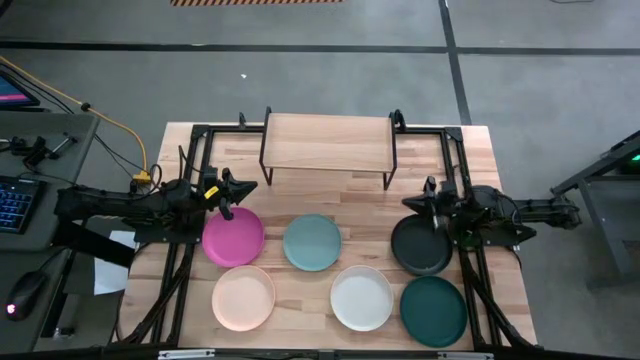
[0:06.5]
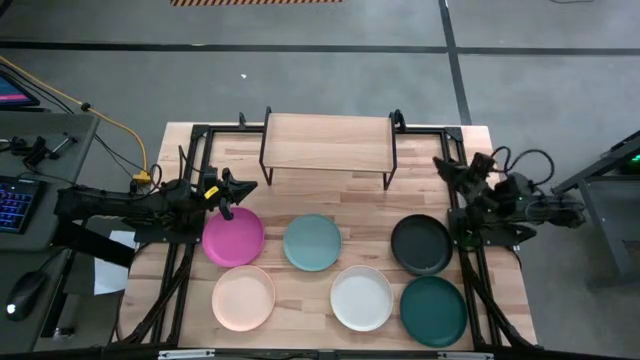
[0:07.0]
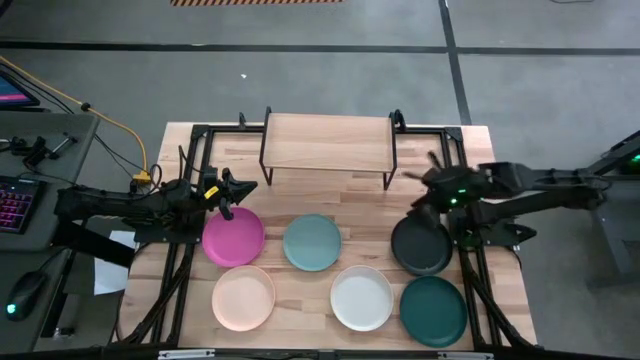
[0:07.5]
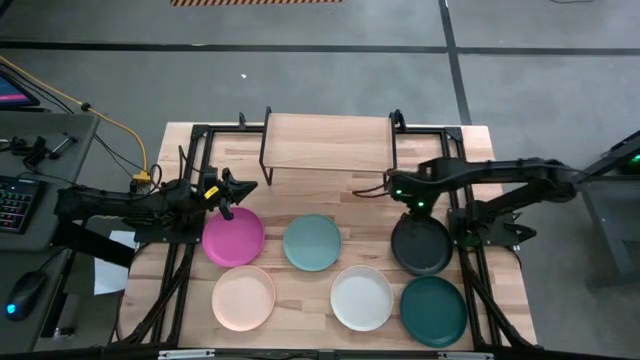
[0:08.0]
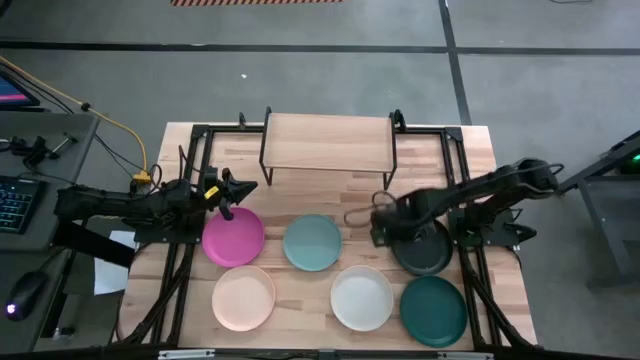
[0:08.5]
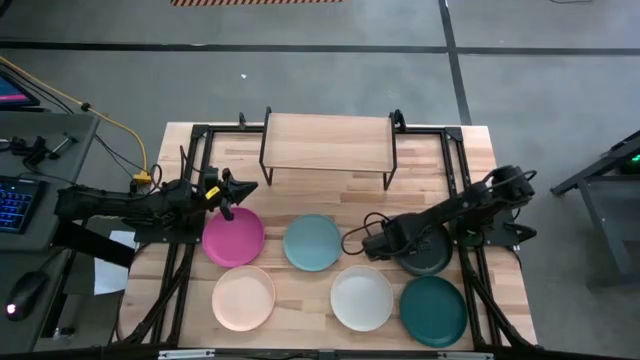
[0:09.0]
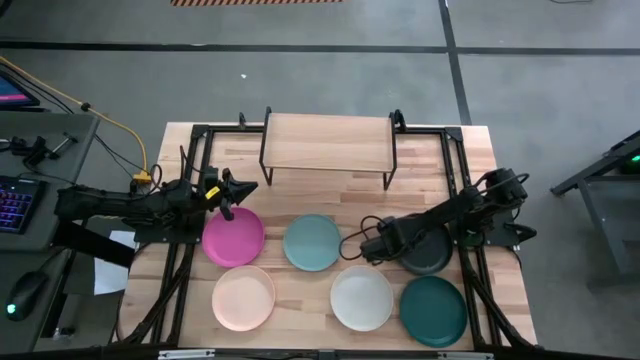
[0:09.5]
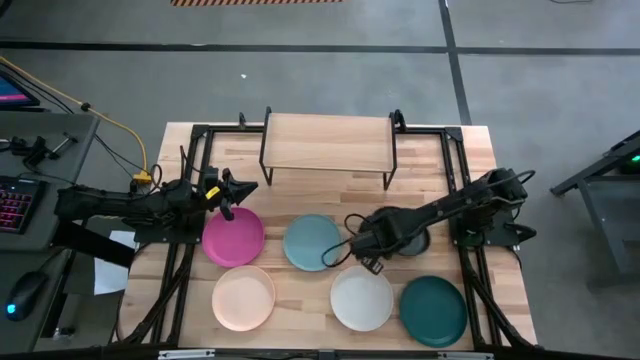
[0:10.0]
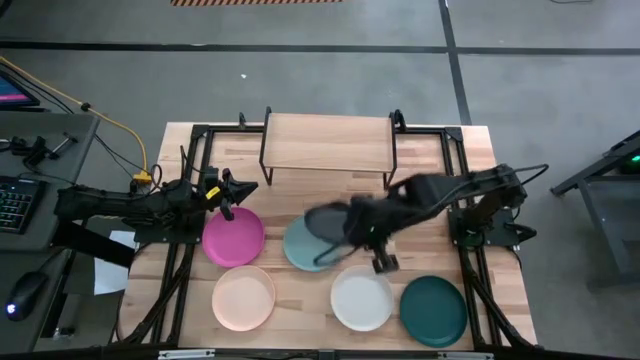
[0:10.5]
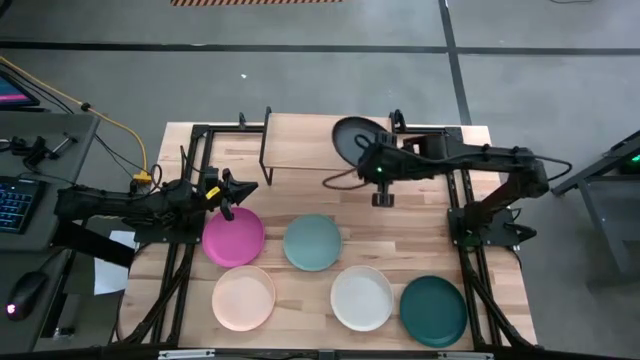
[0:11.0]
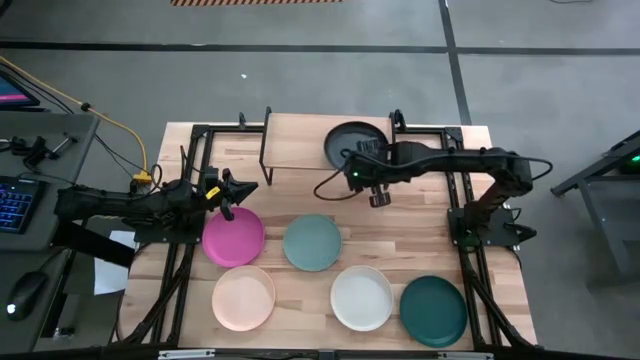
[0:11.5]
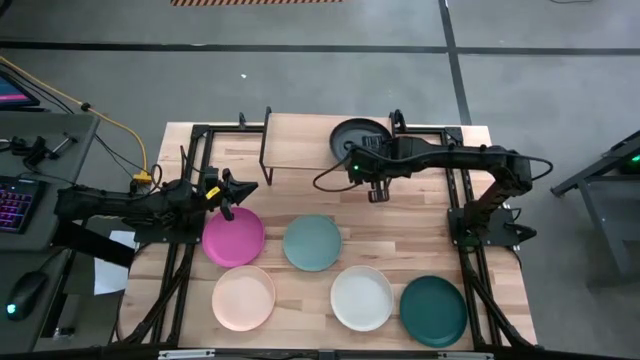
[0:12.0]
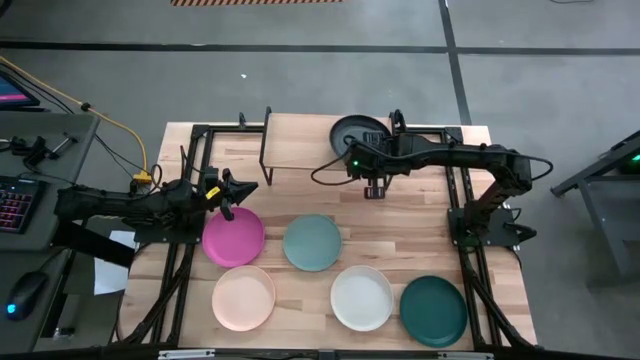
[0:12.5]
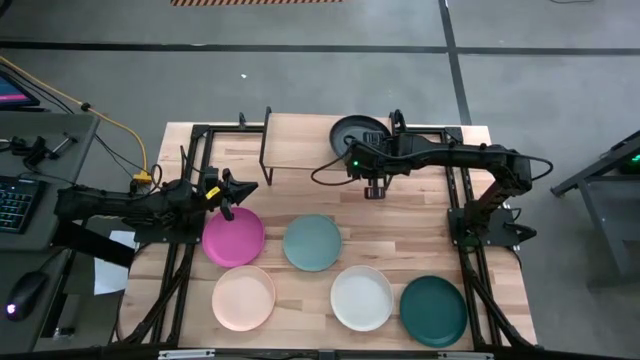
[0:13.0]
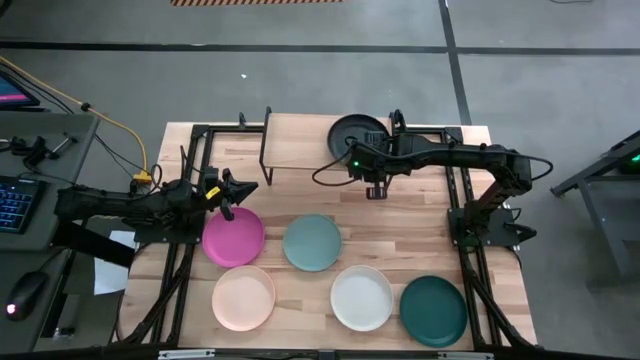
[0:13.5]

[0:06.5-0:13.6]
Task: Place and stack plates onto a shelf
Put the black plate on the shelf

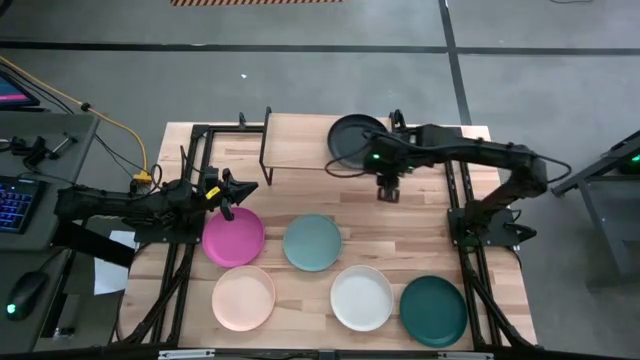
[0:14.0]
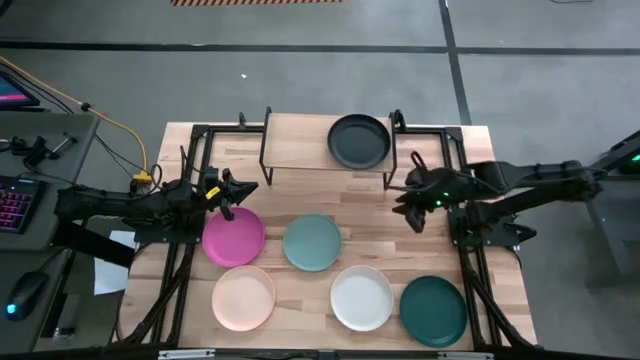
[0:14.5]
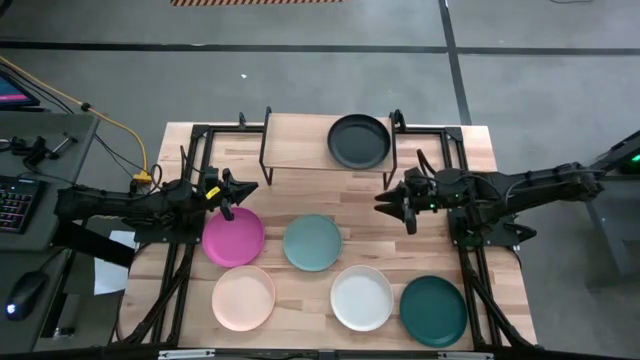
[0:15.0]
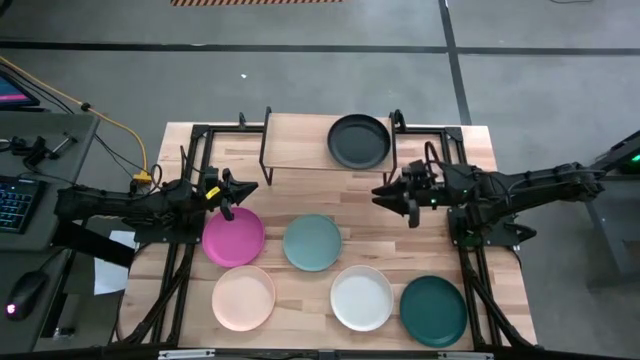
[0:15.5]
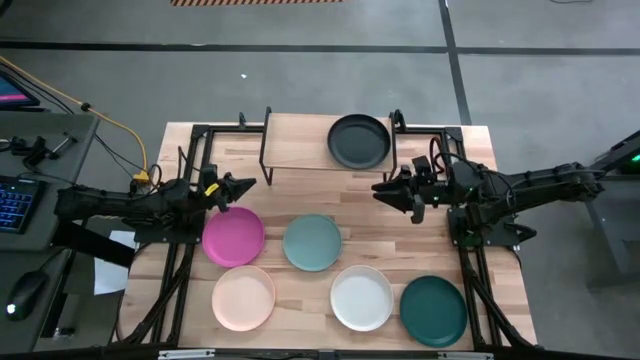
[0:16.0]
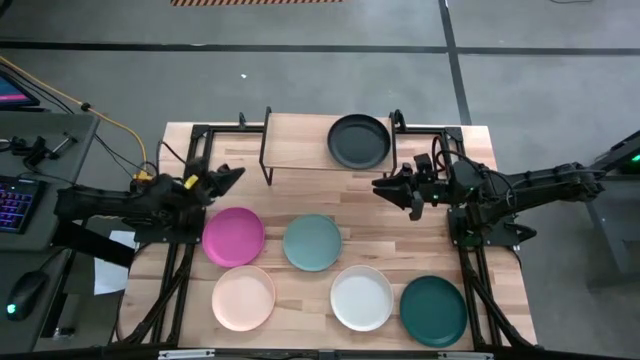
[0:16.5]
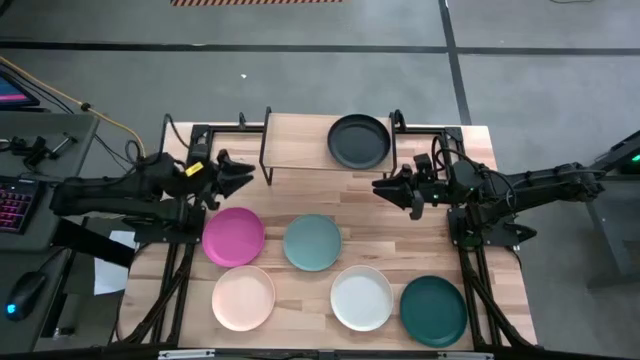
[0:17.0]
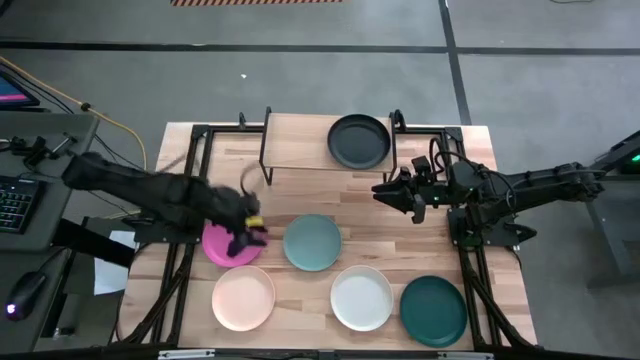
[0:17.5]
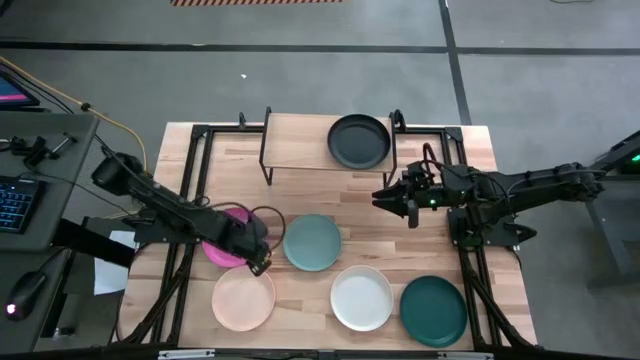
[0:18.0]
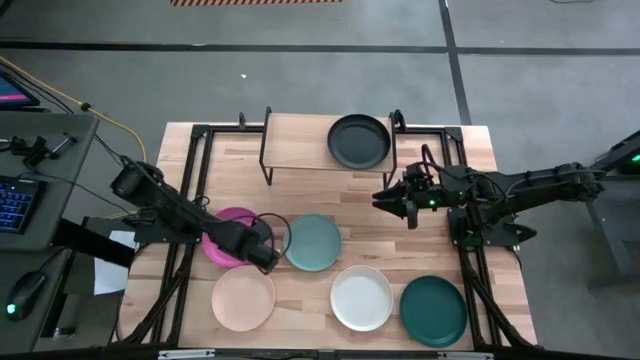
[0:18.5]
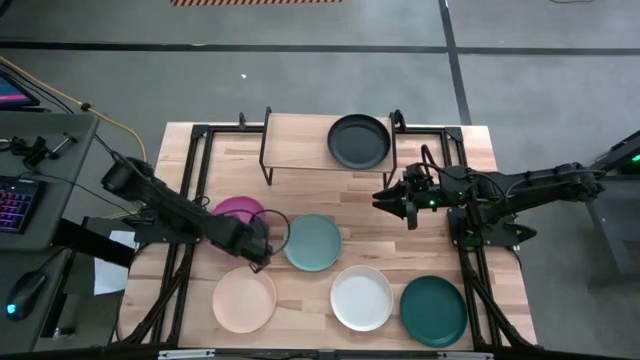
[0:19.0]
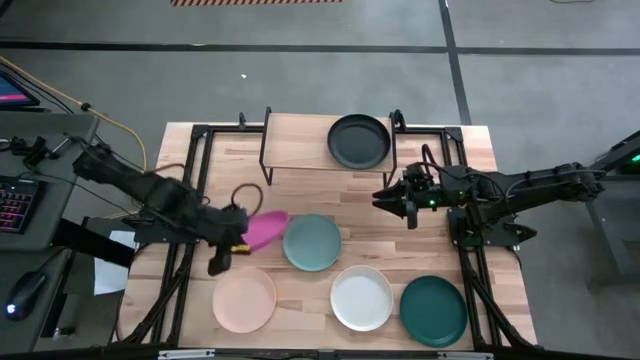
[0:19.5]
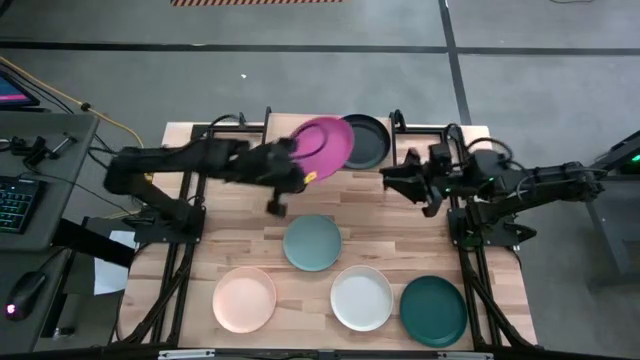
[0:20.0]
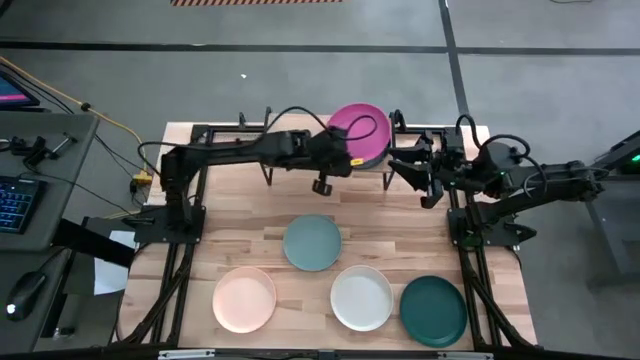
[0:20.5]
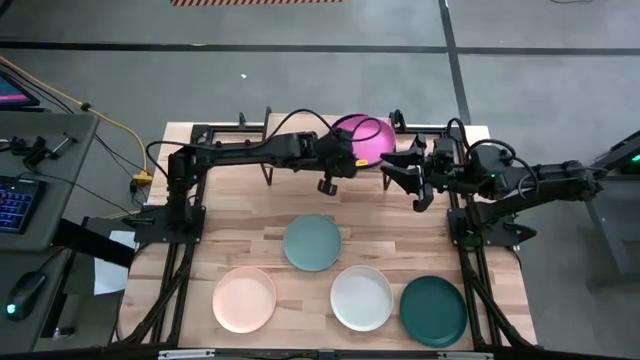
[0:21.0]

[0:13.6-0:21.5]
Stack the pink plate on top of the black plate on the shelf

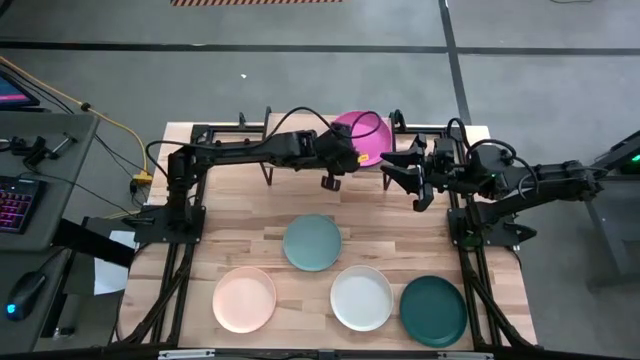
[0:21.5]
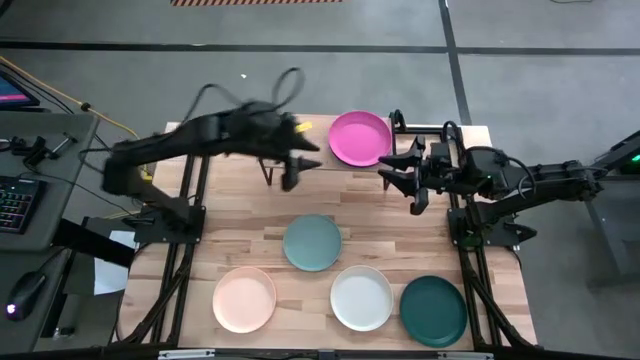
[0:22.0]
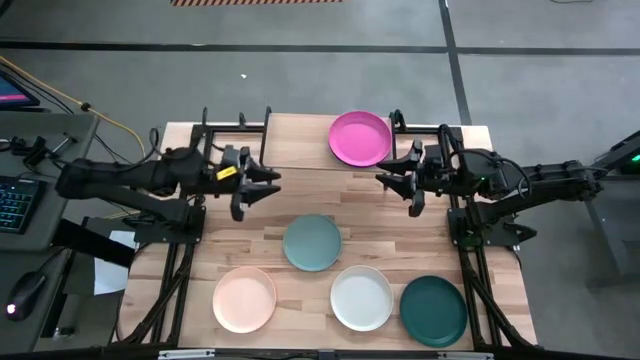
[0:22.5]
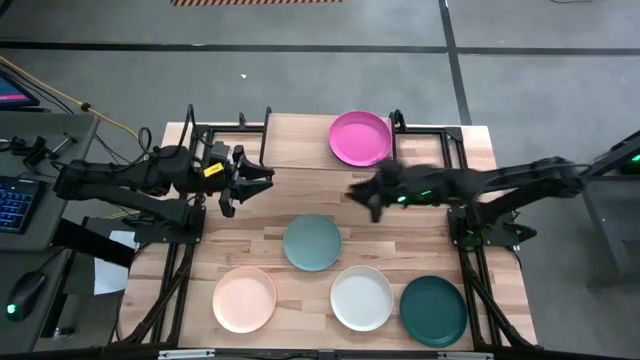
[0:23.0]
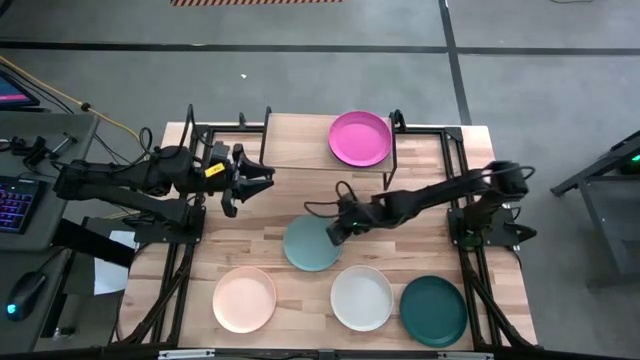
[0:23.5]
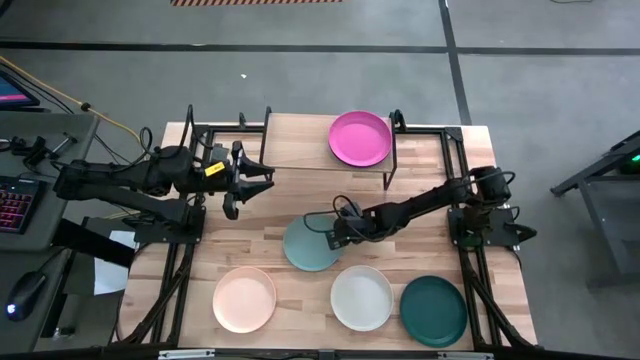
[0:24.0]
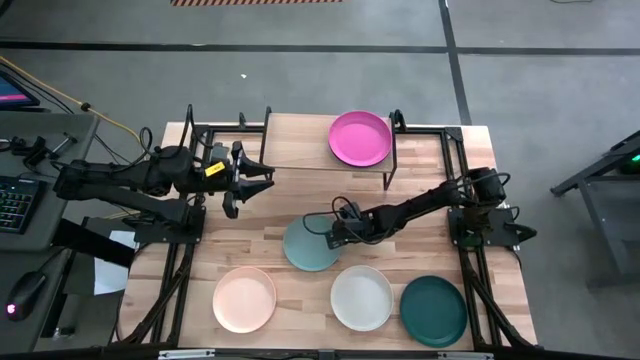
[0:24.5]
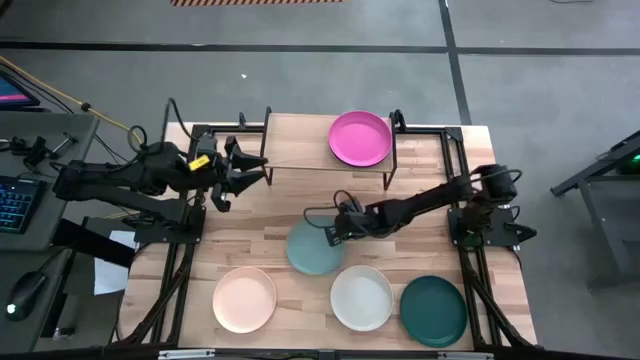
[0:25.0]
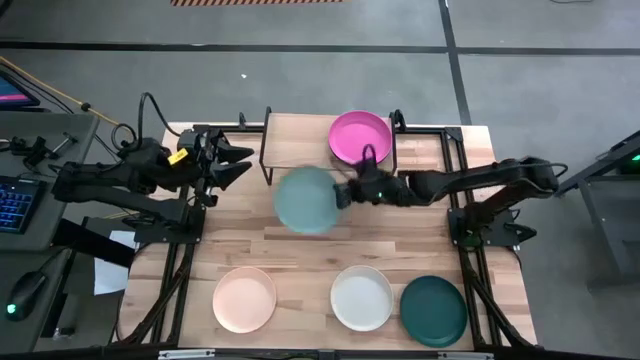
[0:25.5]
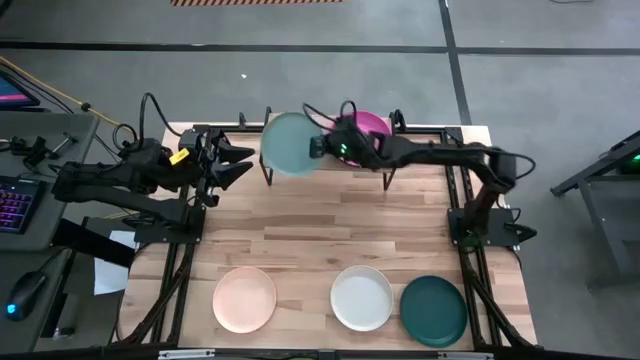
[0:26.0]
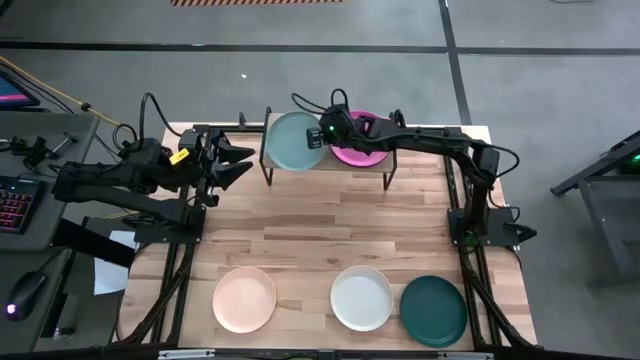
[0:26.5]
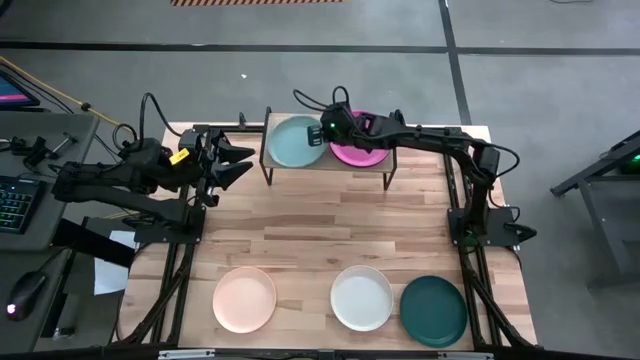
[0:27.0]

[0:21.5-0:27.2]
Put the gray plate on the shelf

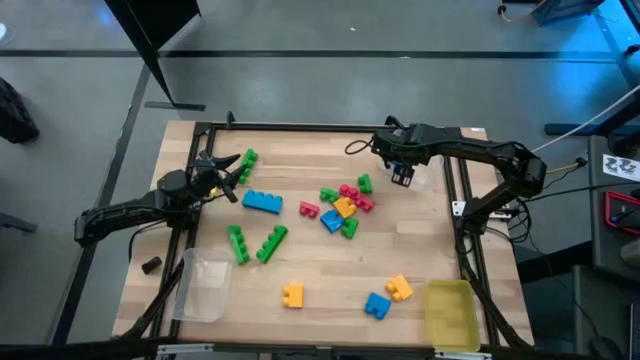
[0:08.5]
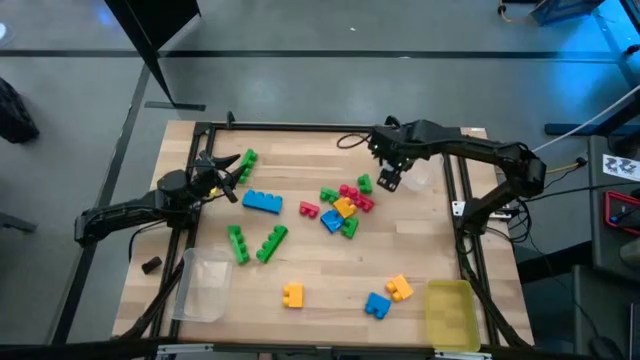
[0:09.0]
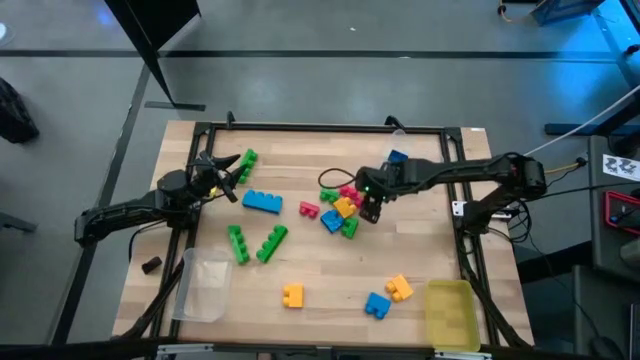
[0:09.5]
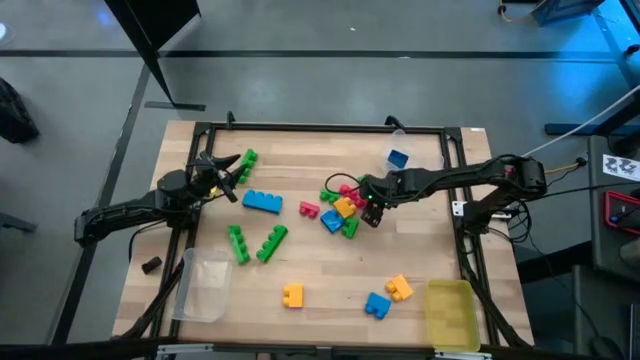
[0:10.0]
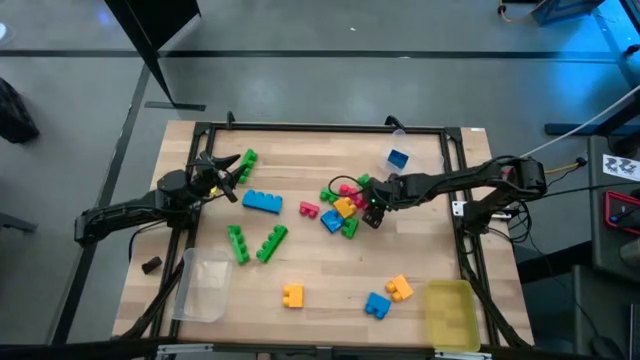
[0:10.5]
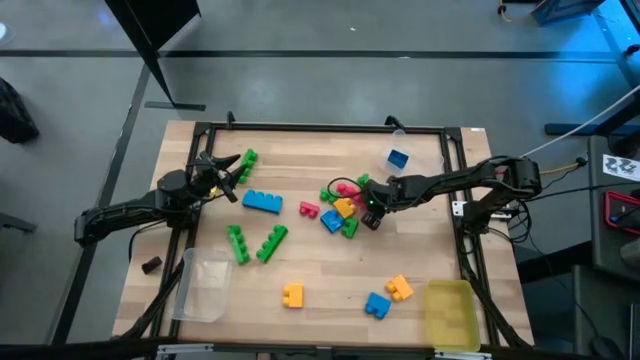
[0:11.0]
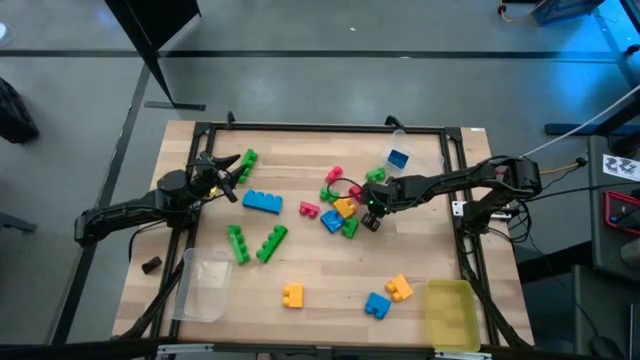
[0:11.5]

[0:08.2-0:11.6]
Task: Sort blocks by size
Put the top right 2 stud red game piece into the yellow transparent bin
